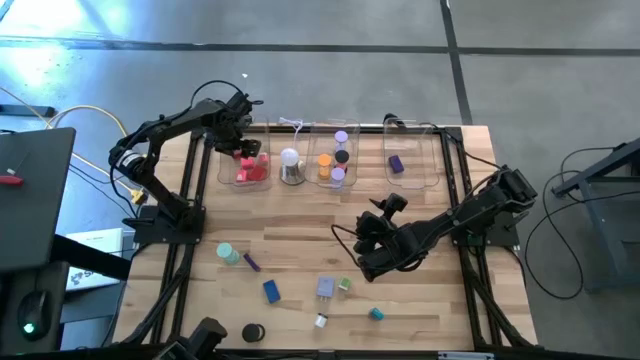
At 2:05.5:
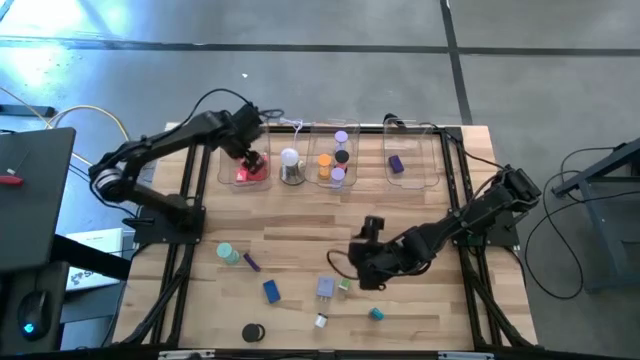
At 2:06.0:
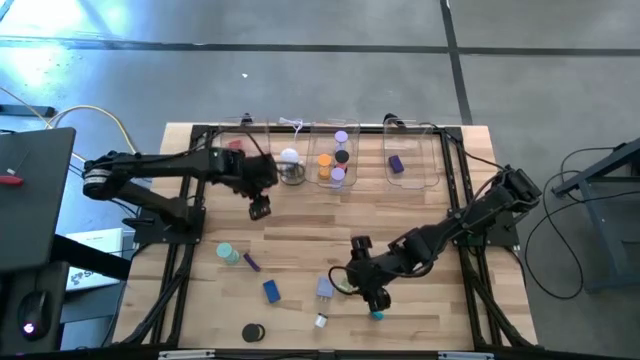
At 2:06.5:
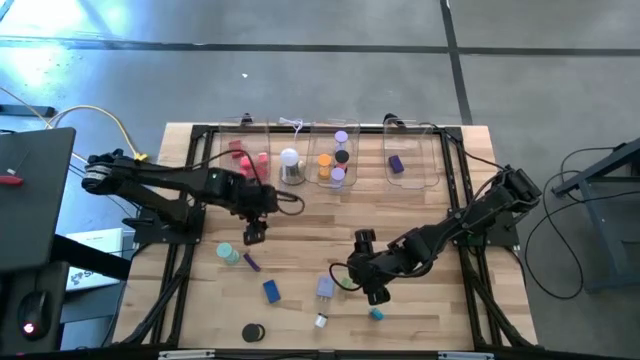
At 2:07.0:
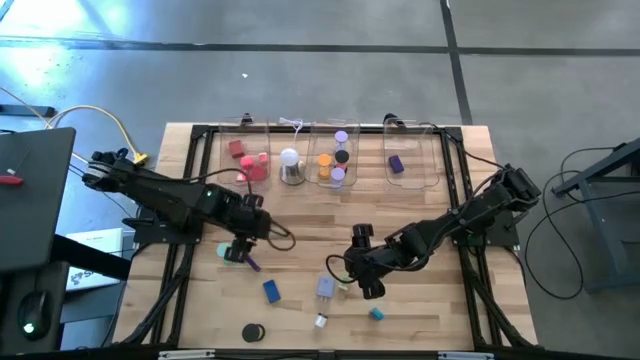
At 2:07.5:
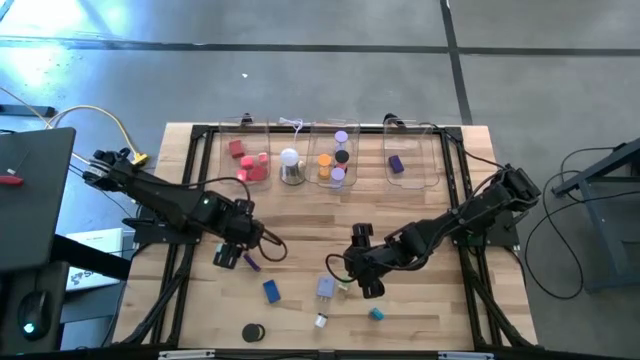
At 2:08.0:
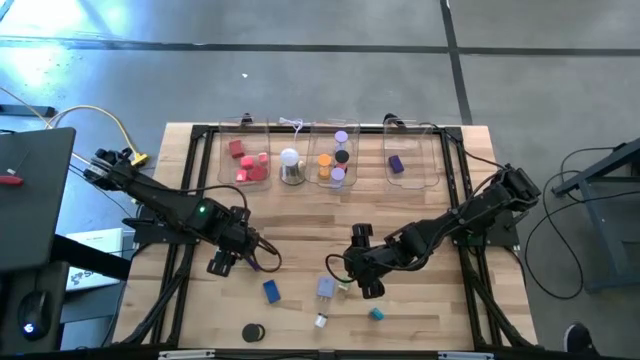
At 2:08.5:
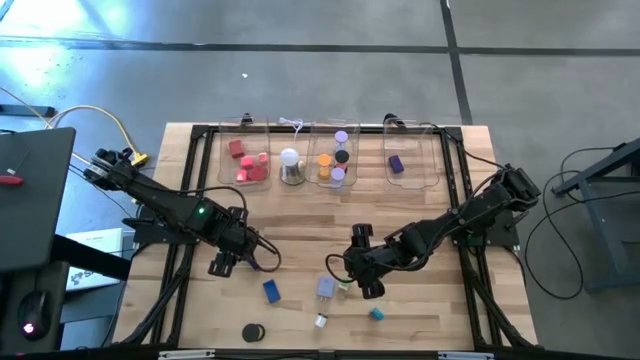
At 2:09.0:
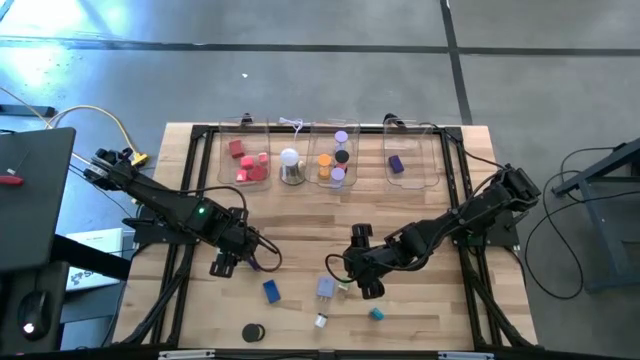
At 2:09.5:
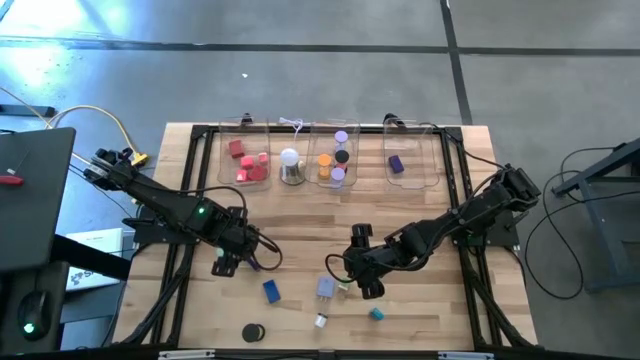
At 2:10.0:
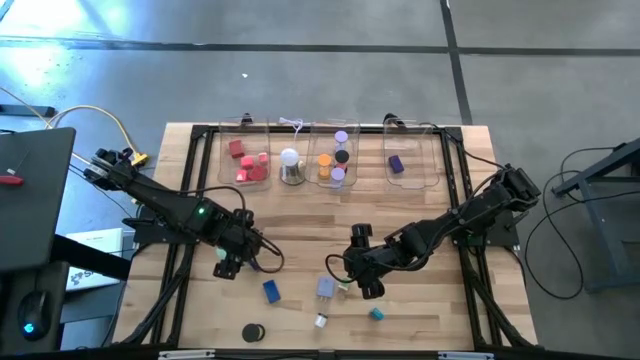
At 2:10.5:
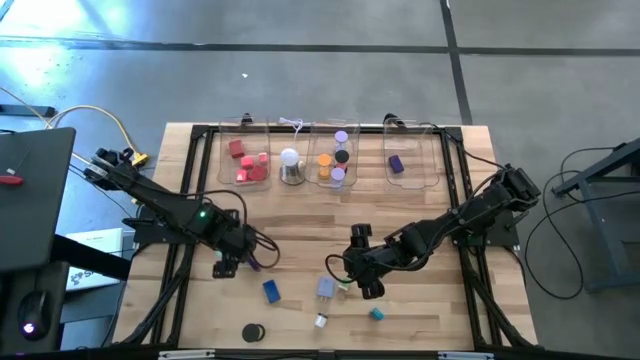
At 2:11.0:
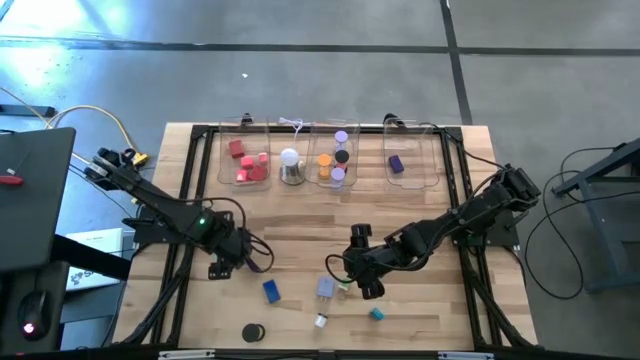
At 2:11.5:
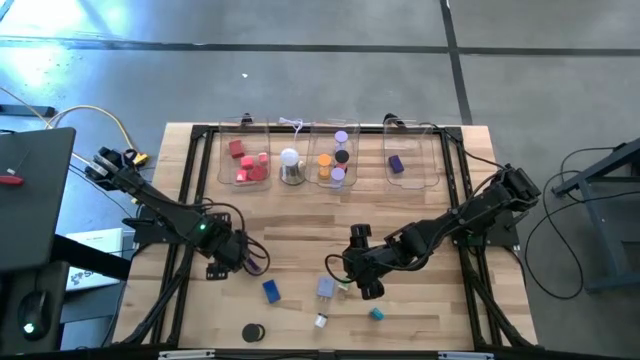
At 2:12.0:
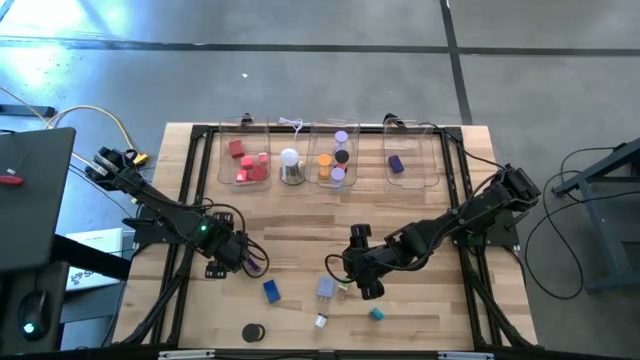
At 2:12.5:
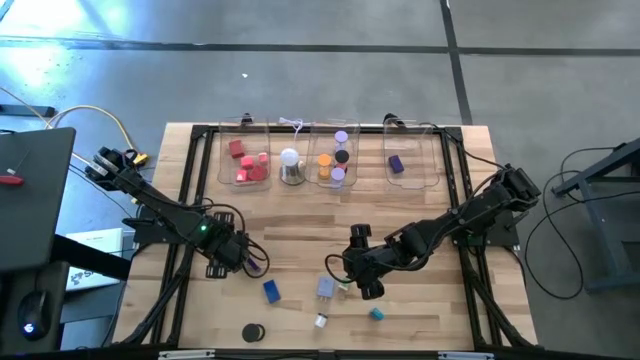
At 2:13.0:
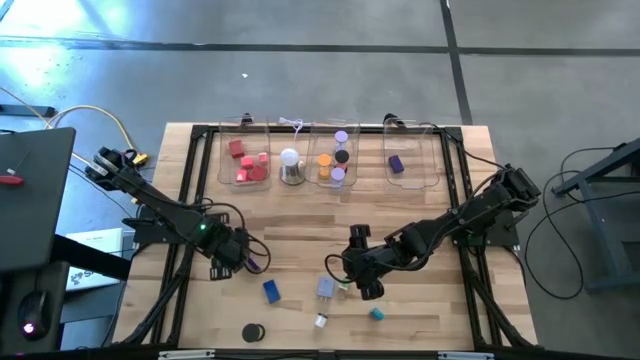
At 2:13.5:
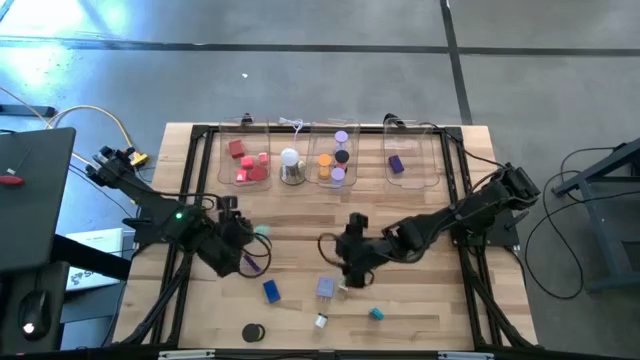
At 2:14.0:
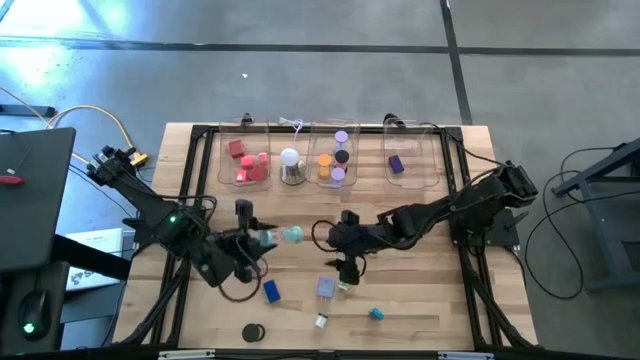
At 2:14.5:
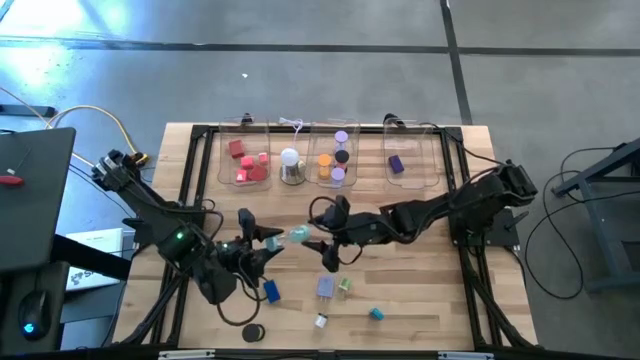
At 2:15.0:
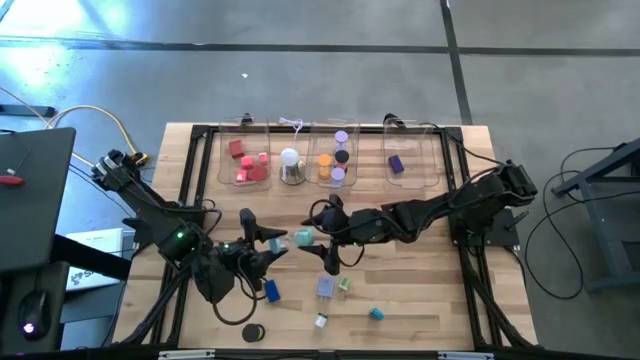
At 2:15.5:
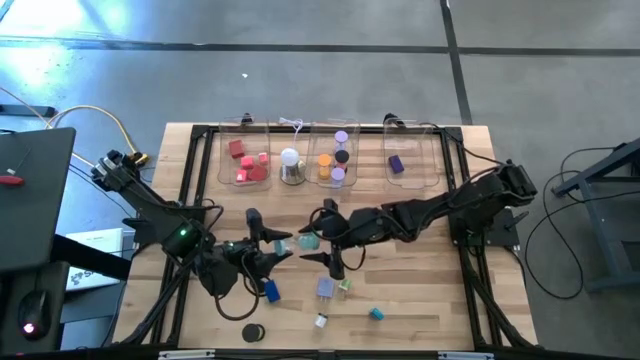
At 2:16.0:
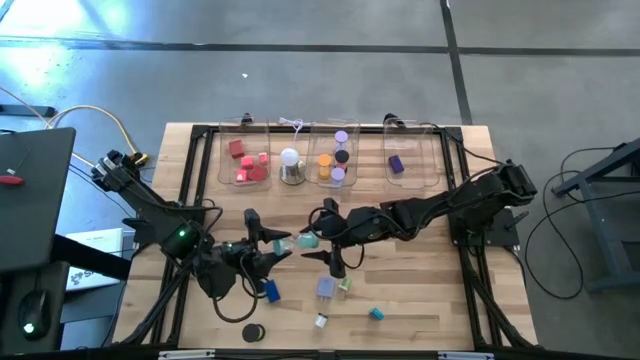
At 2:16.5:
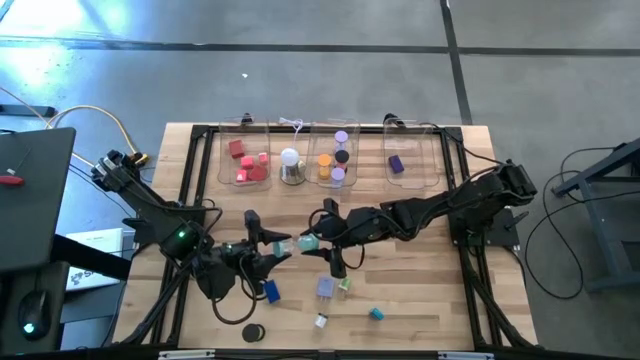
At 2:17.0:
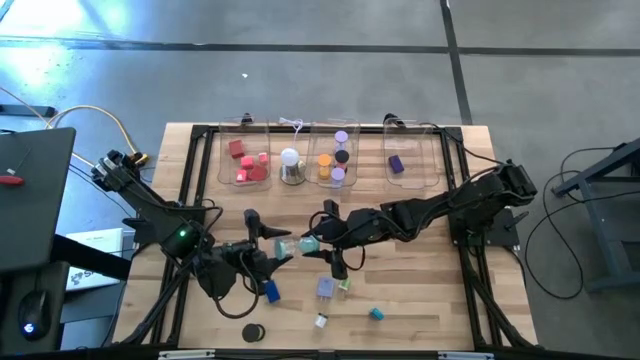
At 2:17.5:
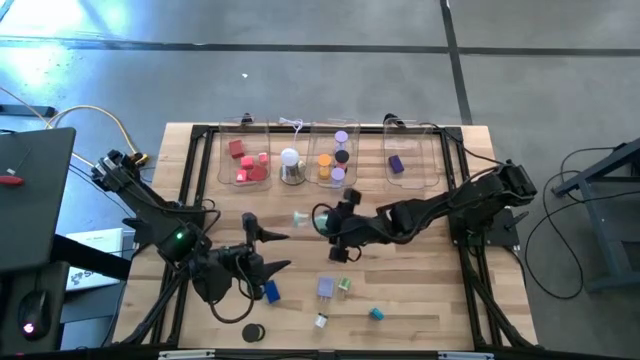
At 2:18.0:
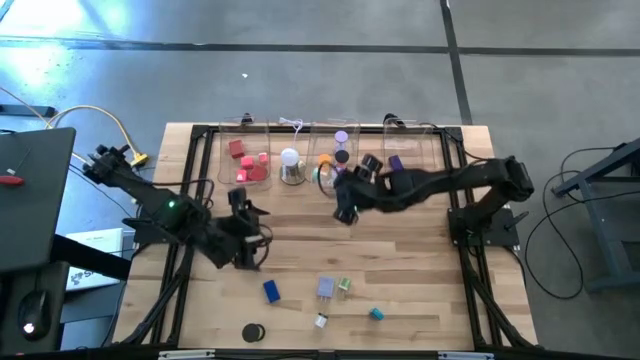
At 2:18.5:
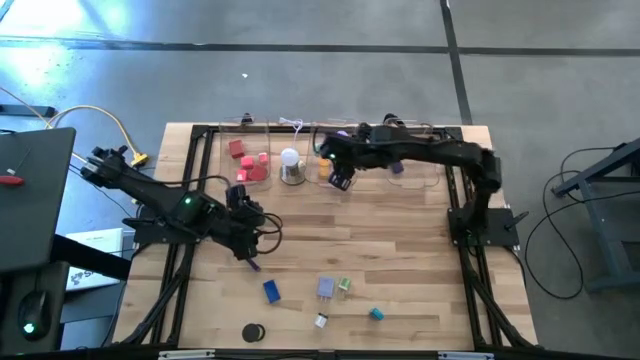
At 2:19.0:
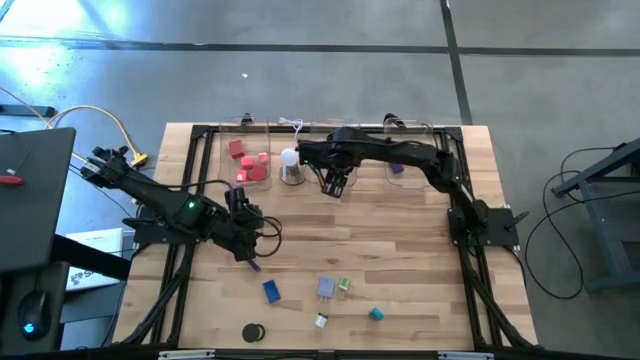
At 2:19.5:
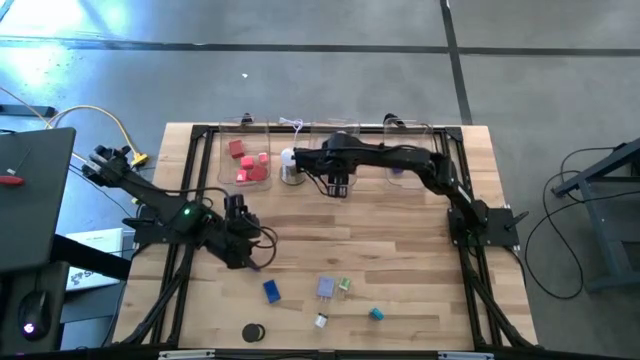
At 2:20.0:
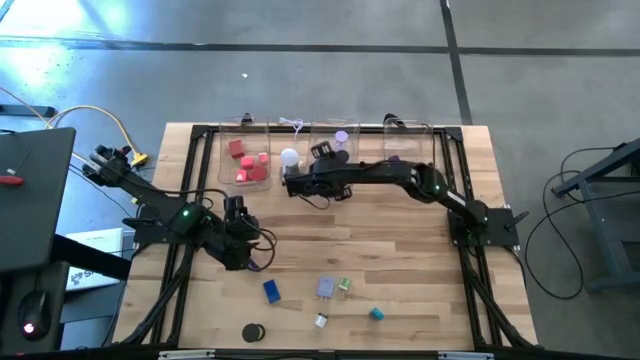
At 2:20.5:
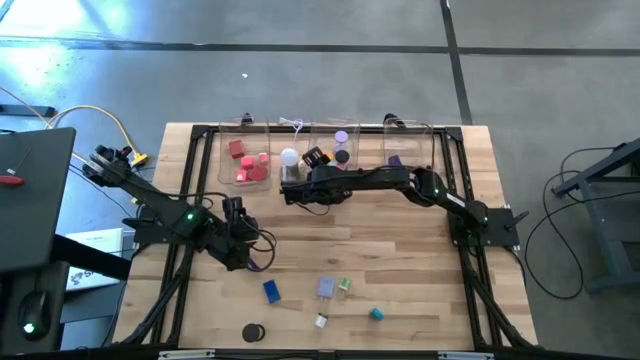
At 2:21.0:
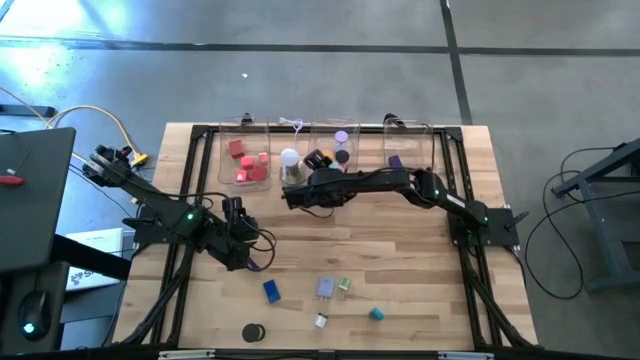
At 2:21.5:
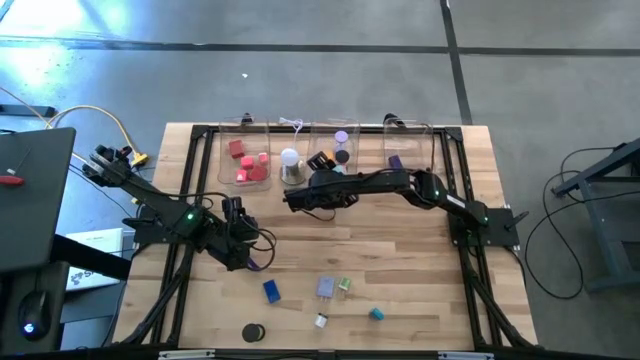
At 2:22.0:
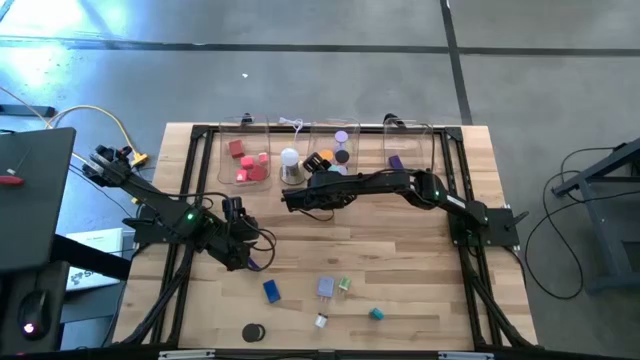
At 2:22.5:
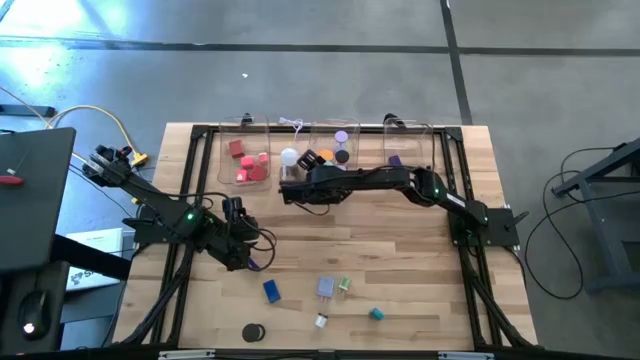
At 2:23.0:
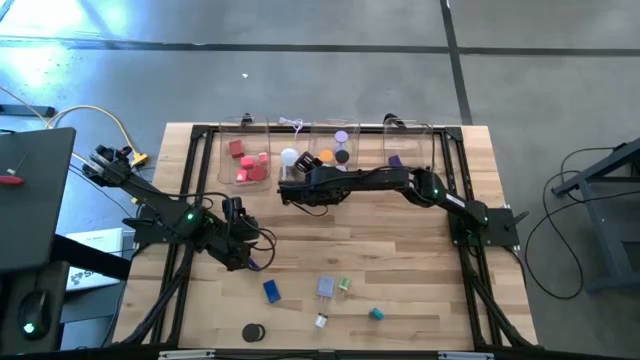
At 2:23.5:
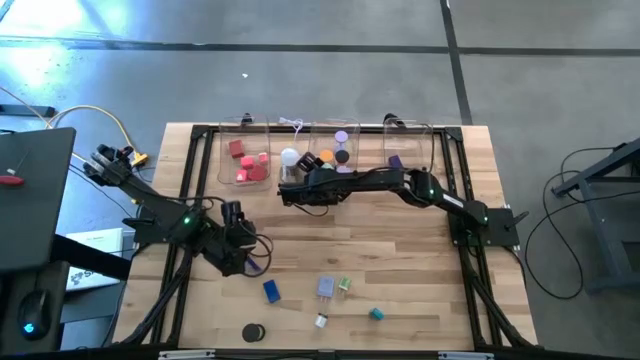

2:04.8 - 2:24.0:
Task: Pick & Place Office items
Put the blue hourglass into the middle transparent bin

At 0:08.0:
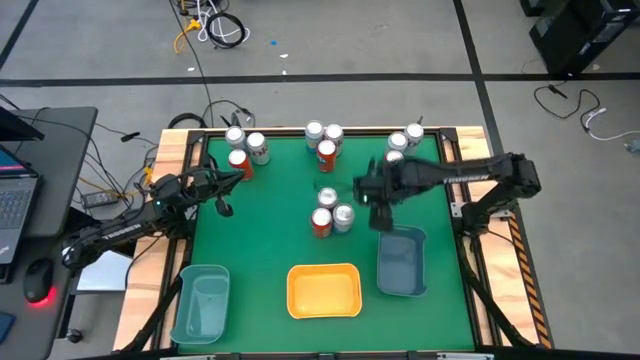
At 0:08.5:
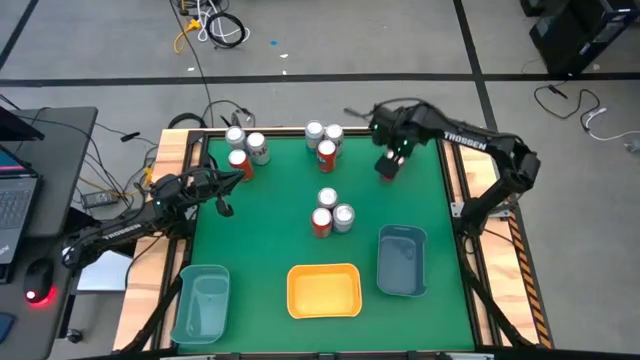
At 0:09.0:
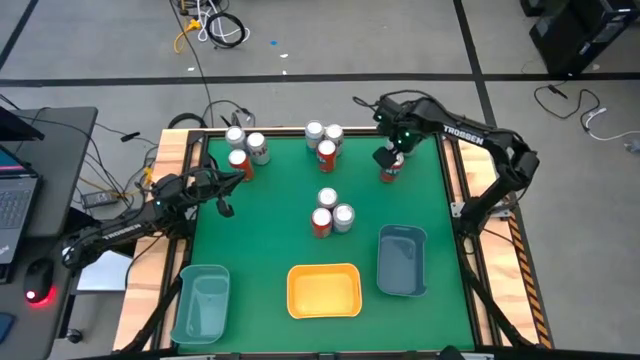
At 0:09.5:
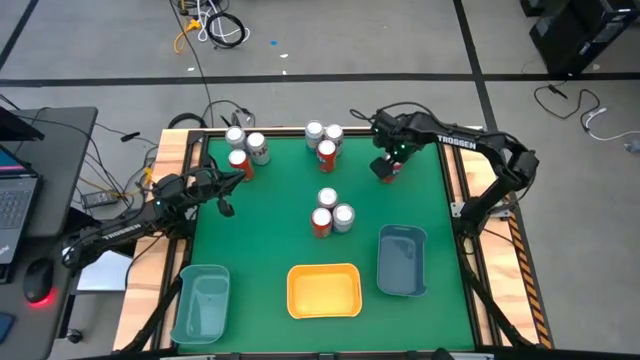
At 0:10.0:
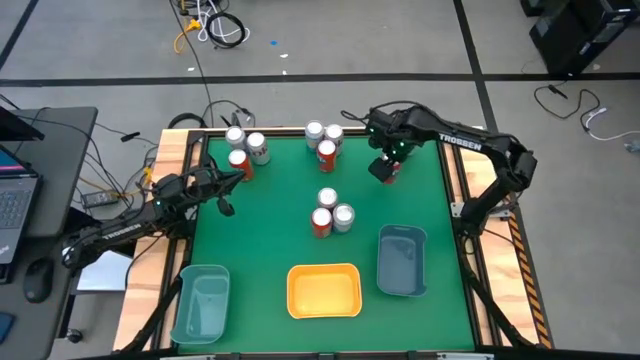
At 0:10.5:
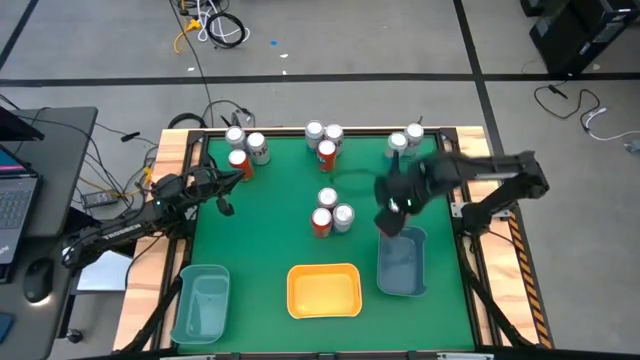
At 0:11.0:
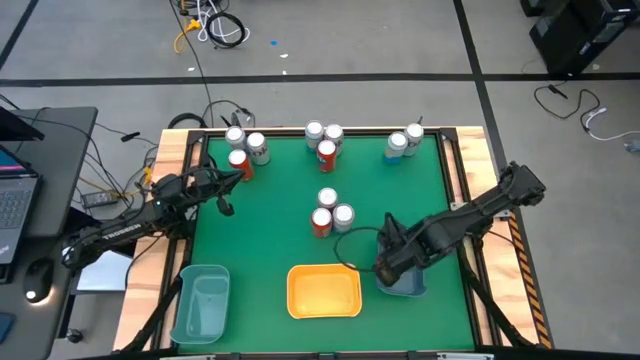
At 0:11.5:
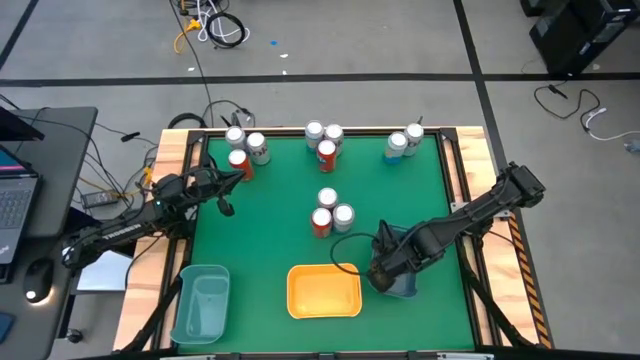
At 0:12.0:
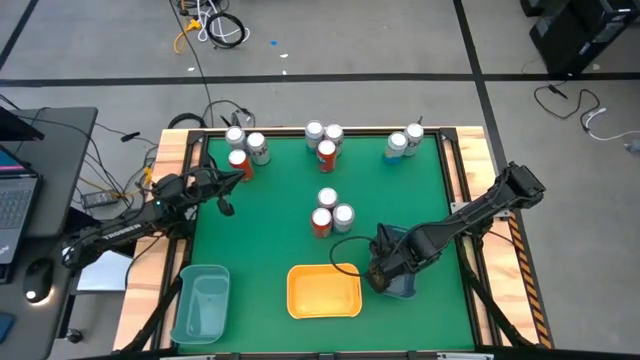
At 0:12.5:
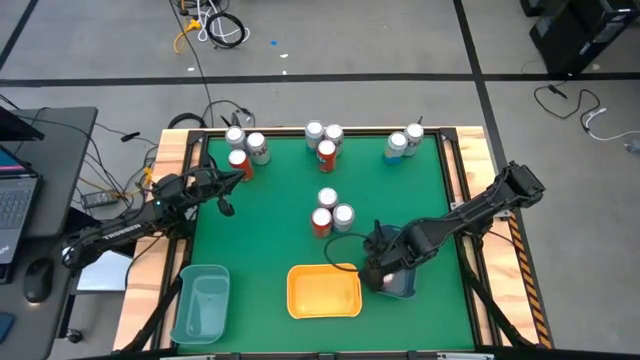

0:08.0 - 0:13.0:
Task: Sort soda cans
Put the red soda can into the blue bin
